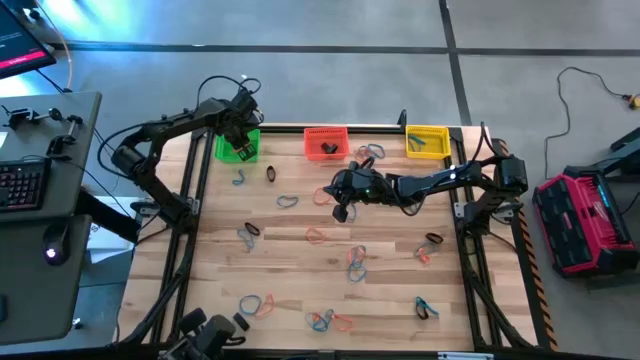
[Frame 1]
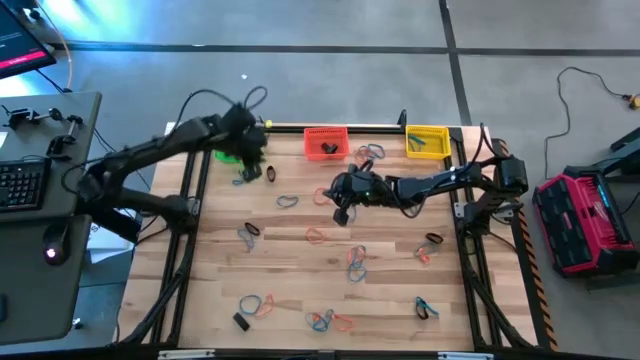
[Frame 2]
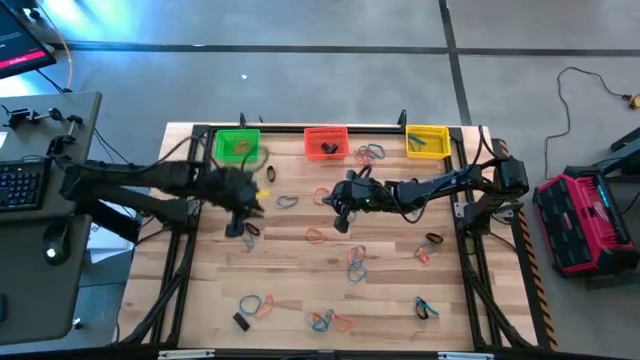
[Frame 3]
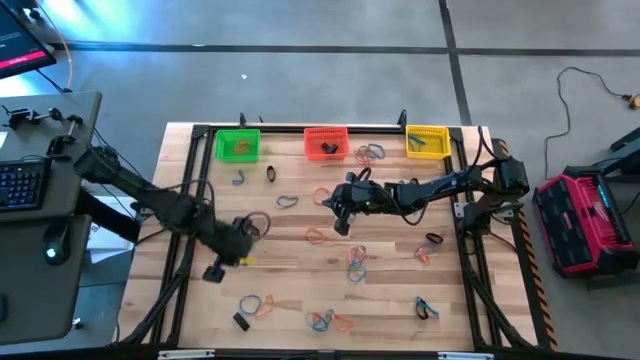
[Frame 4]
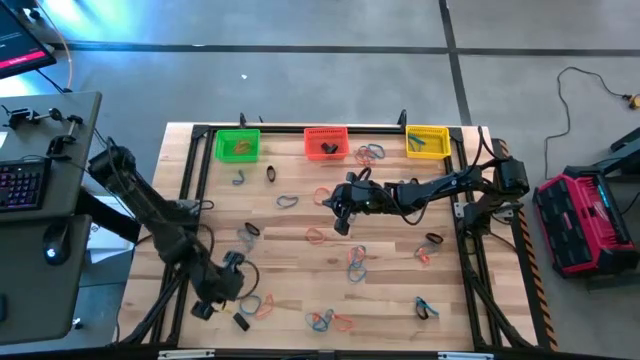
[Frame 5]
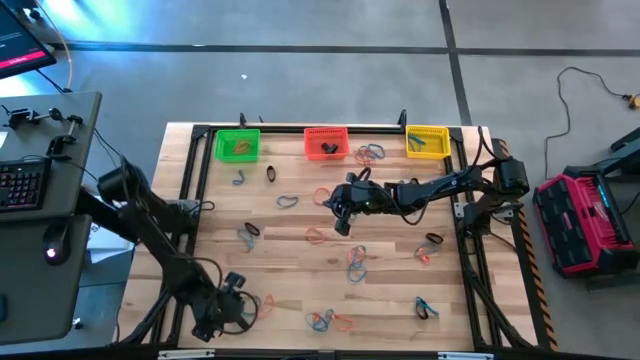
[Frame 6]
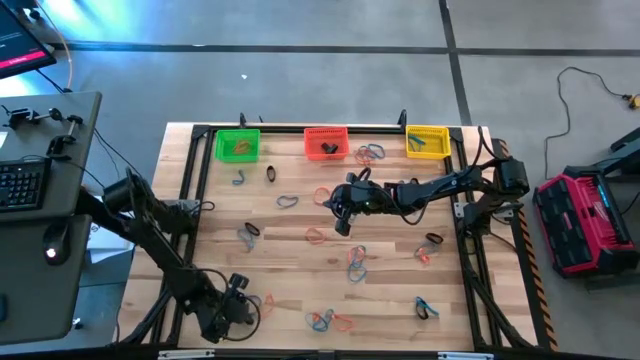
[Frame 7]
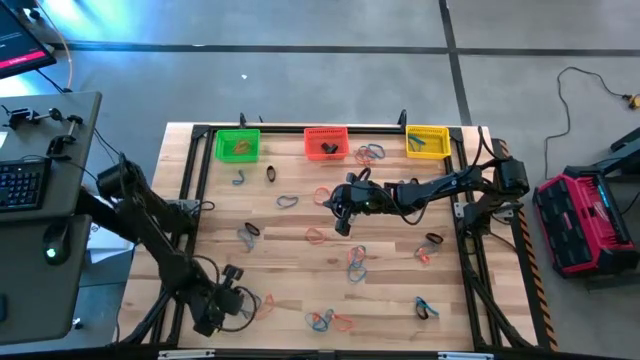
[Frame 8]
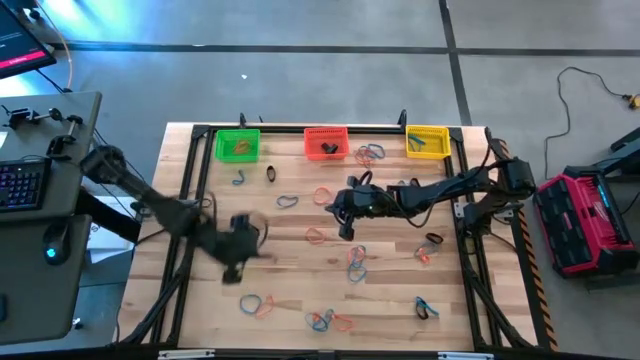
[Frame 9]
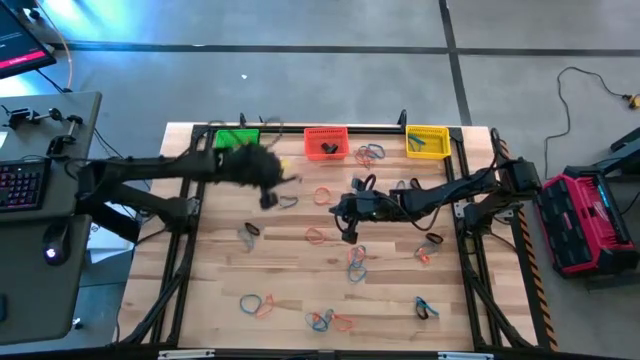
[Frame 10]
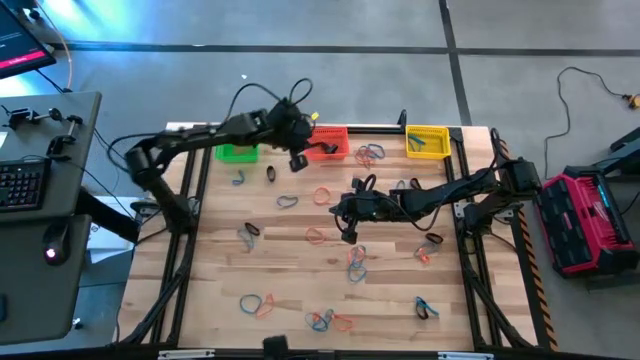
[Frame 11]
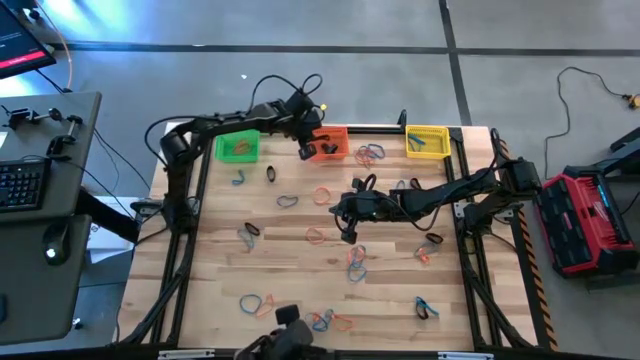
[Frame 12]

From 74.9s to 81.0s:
Task: Sort rubber bands into baskets
Put the black rubber band into the orange bin

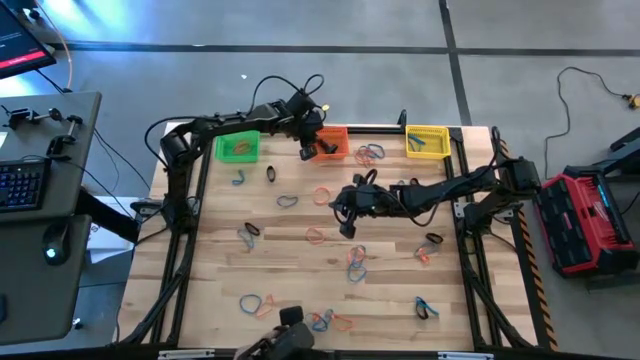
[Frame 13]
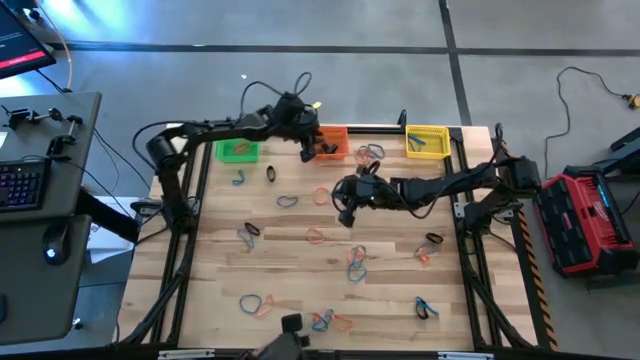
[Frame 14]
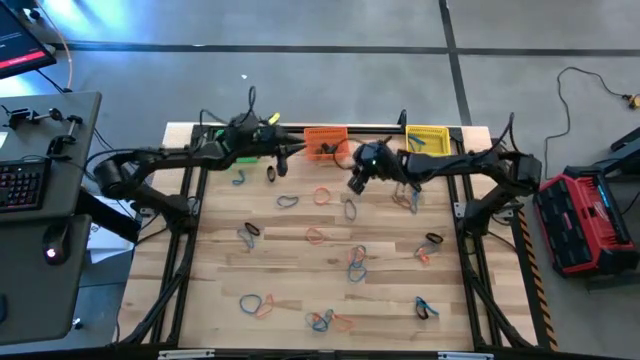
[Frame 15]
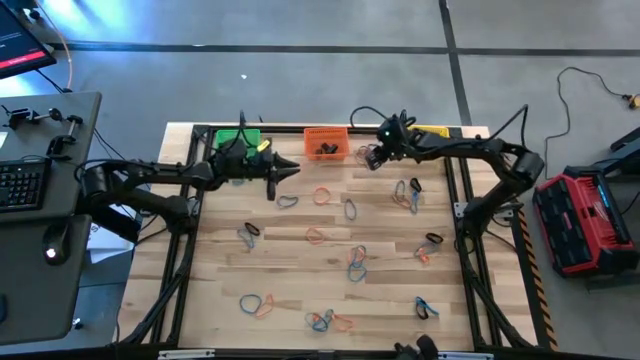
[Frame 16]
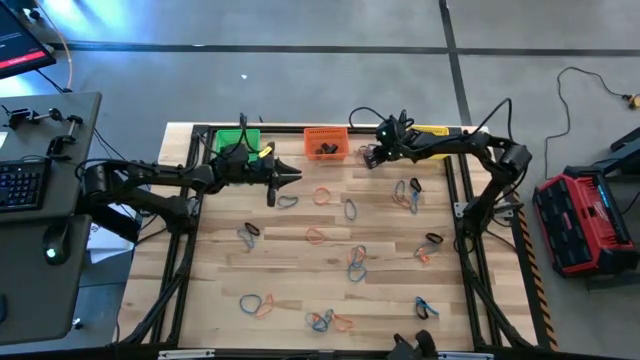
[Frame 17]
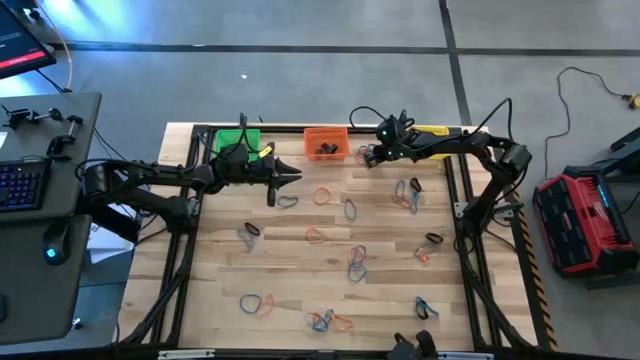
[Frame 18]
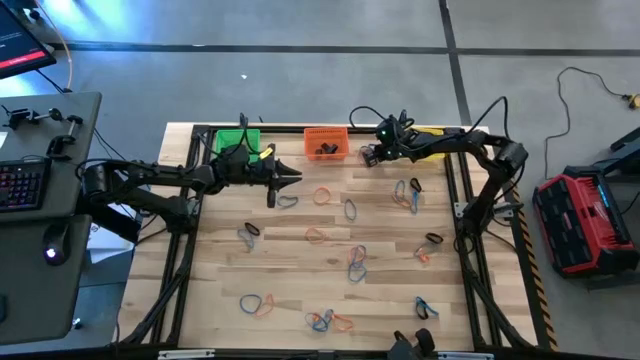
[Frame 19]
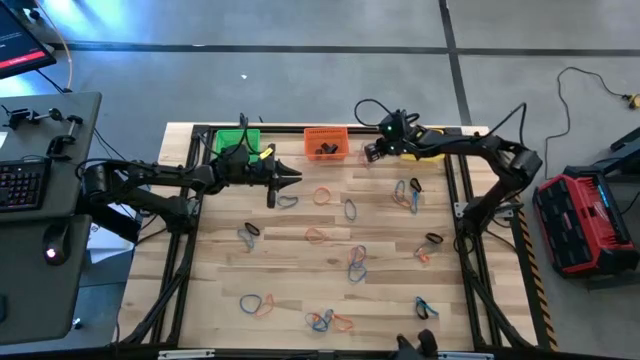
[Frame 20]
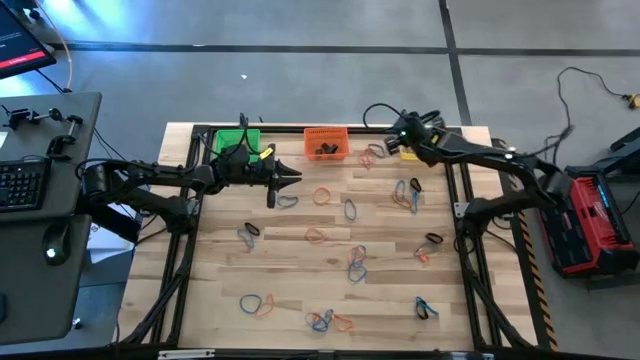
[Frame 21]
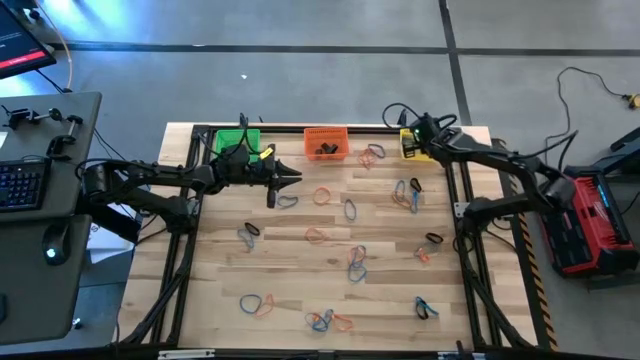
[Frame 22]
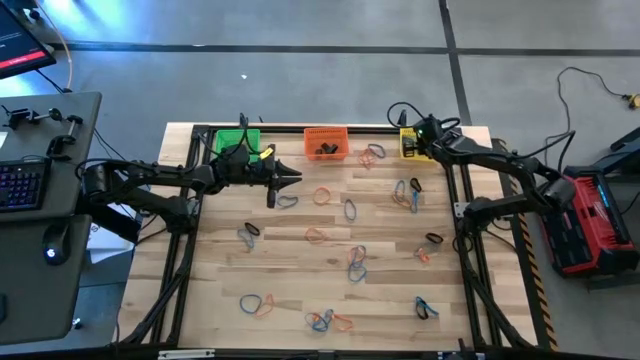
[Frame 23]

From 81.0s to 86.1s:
Put the blue rubber band into the yellow bin

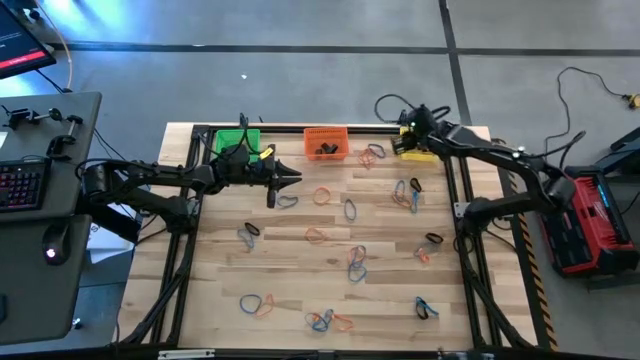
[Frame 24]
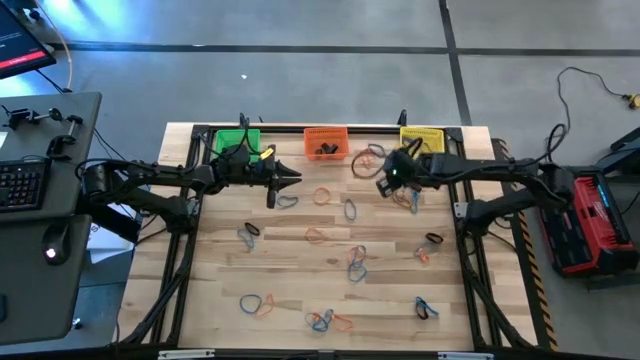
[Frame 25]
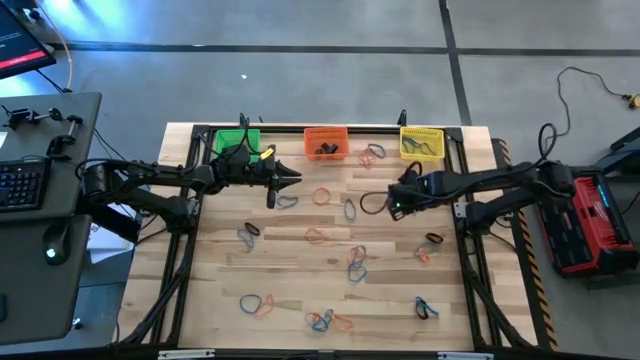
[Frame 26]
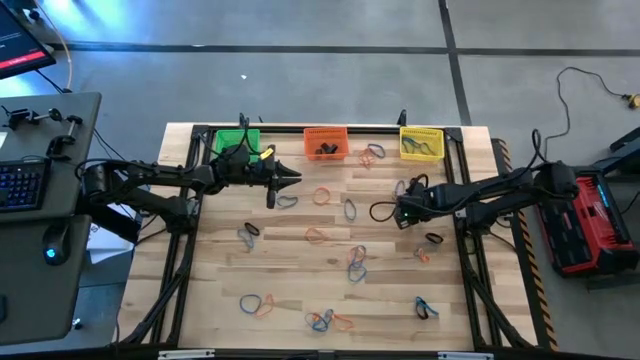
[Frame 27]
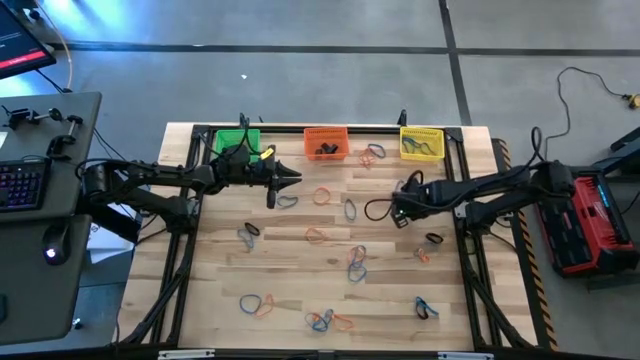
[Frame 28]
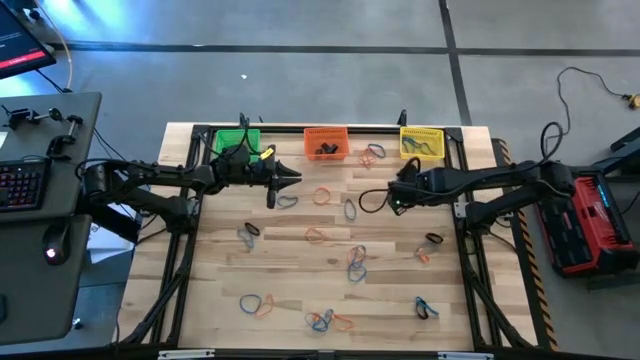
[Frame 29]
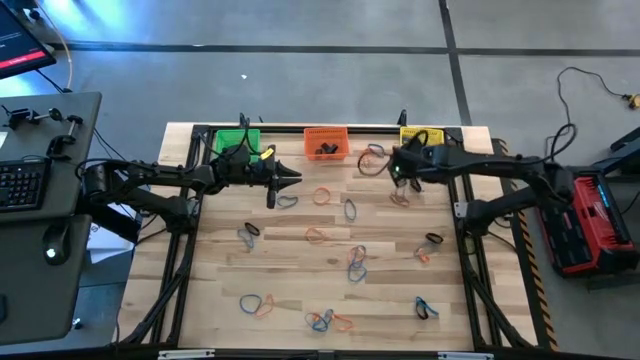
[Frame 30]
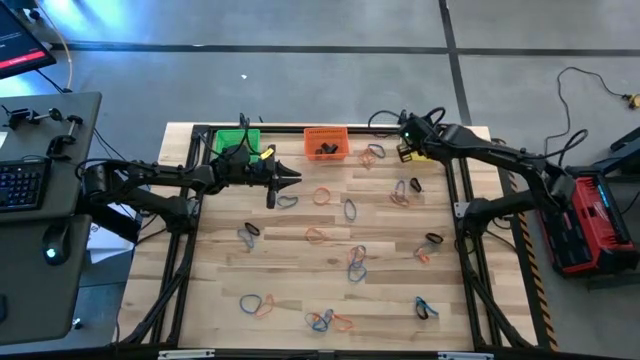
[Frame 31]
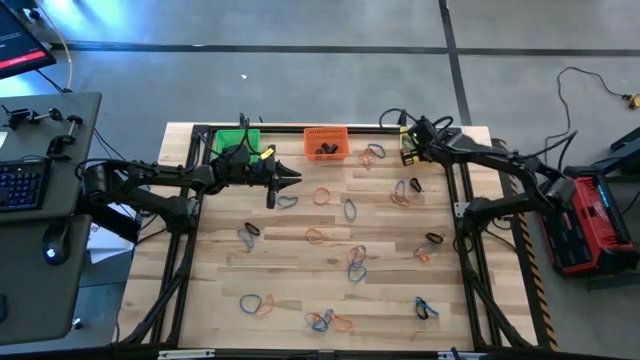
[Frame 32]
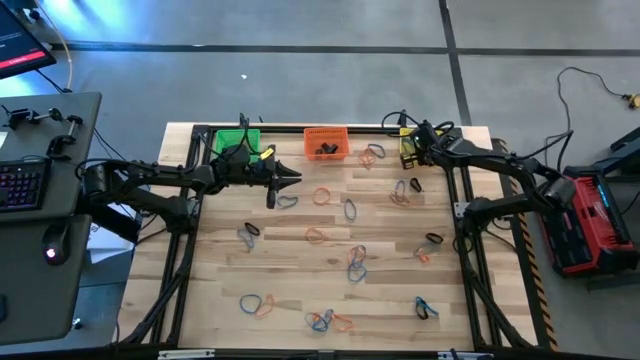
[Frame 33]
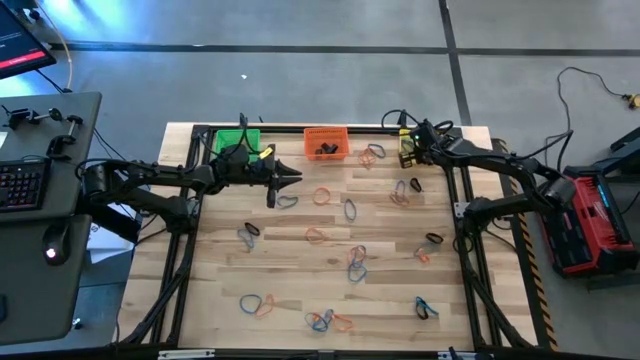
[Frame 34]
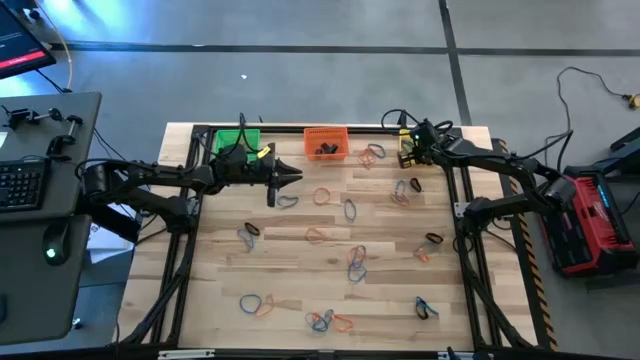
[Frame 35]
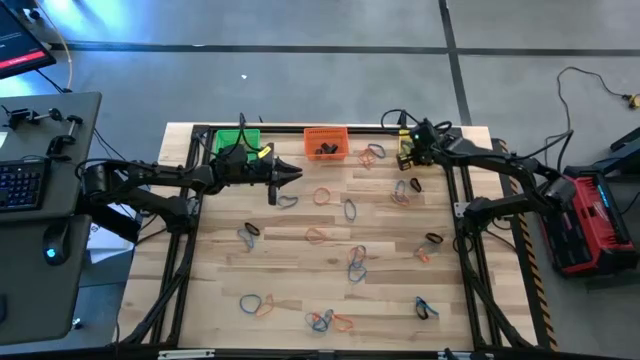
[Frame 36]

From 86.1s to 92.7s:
Put the blue rubber band into the yellow bin

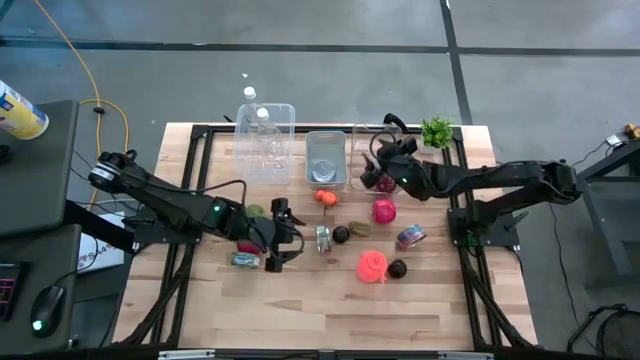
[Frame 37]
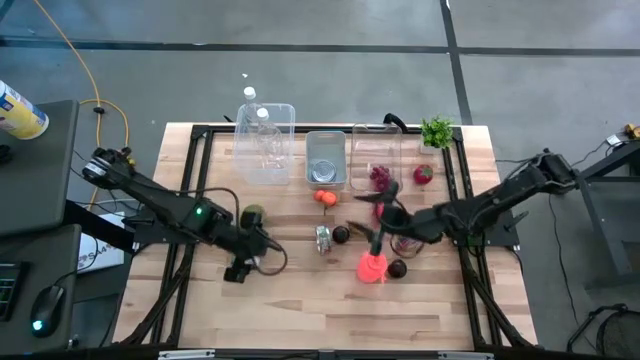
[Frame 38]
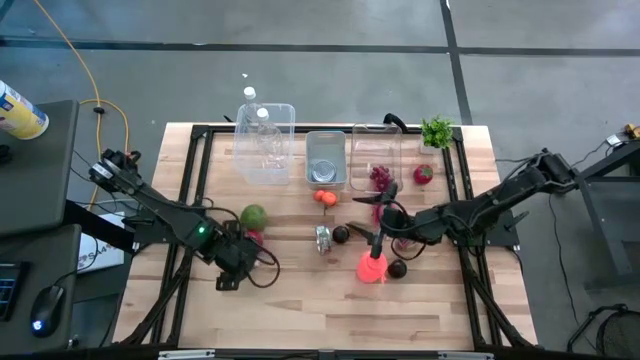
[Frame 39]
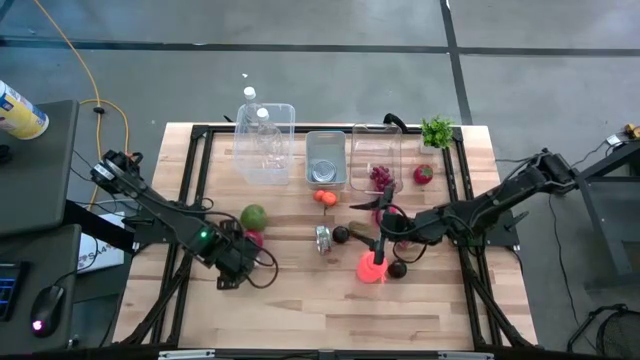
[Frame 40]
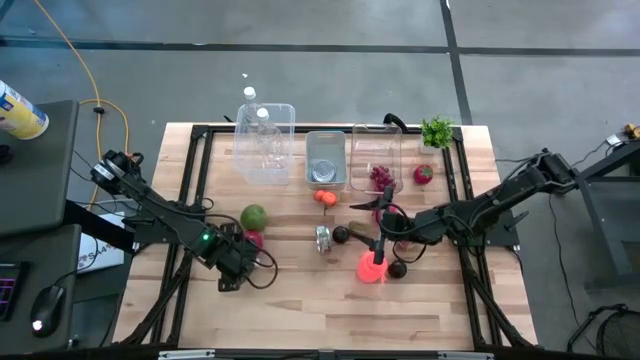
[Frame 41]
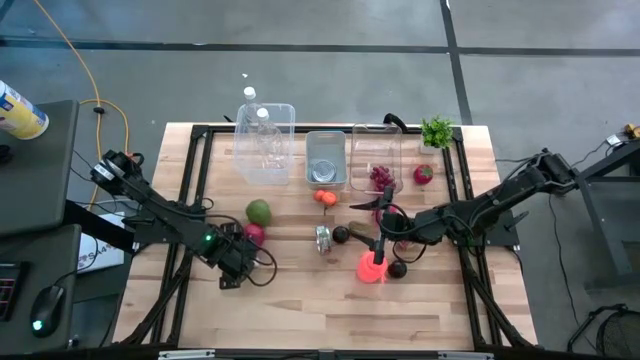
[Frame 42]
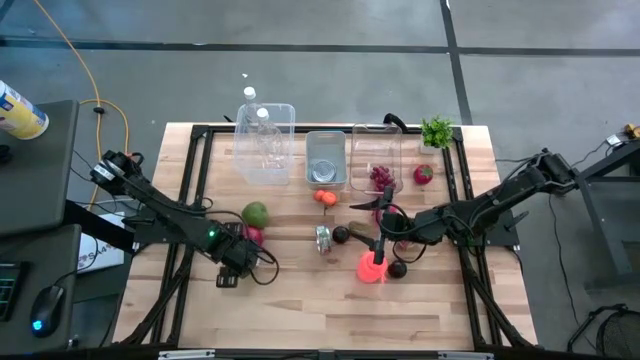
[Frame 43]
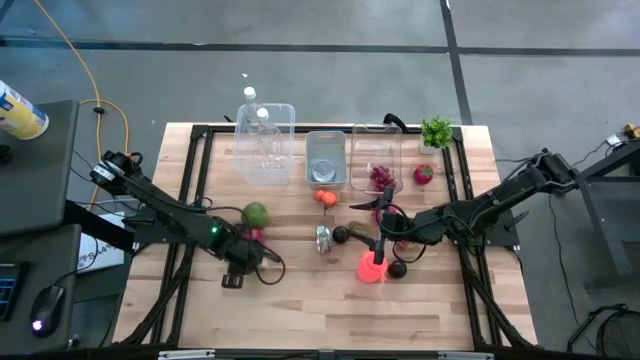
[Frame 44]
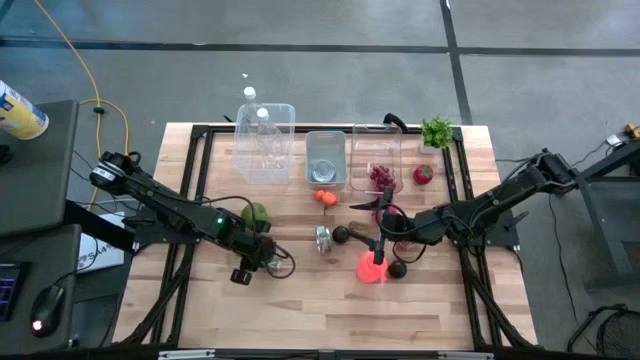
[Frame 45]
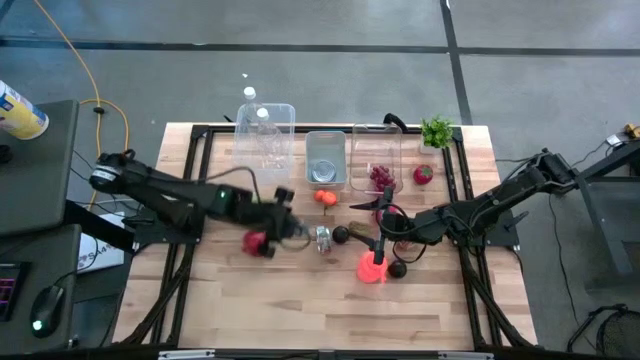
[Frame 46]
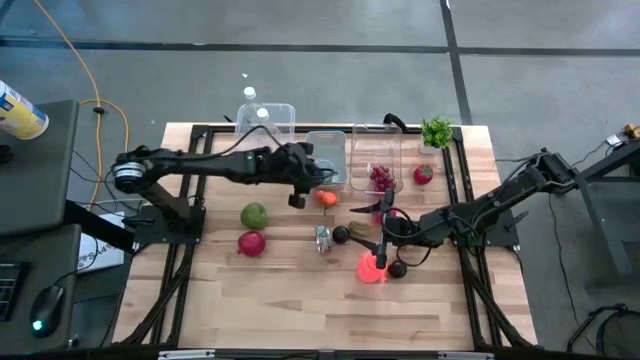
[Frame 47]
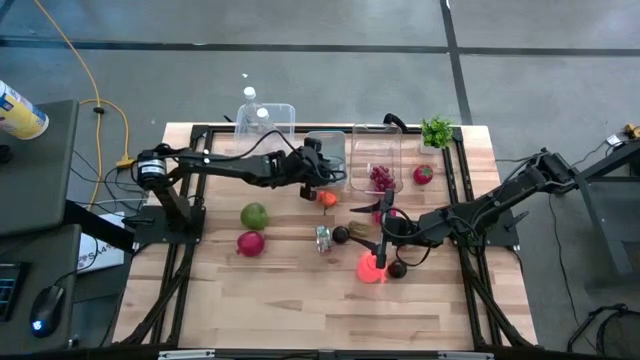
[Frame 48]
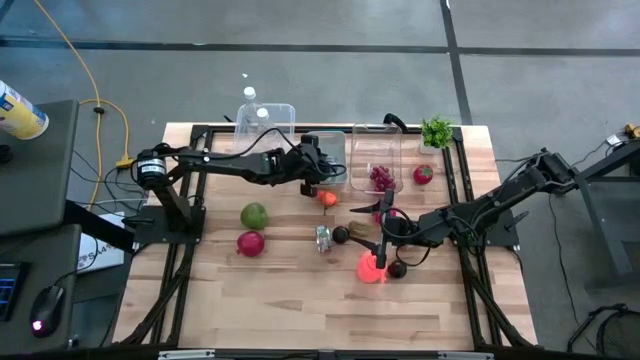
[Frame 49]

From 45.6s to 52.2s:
Task: Pick & Place Food Item
Put the green blue tuna can into the grey bin
